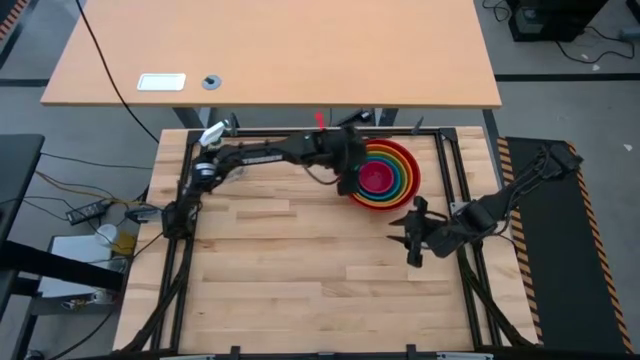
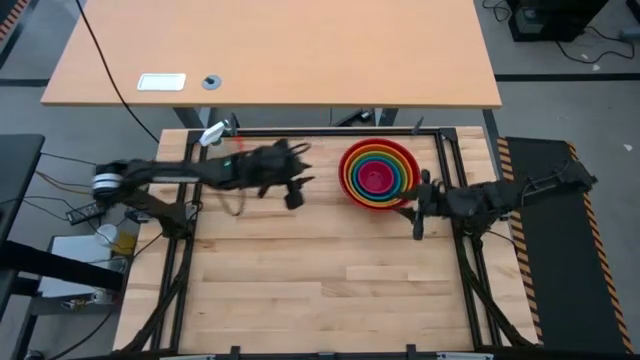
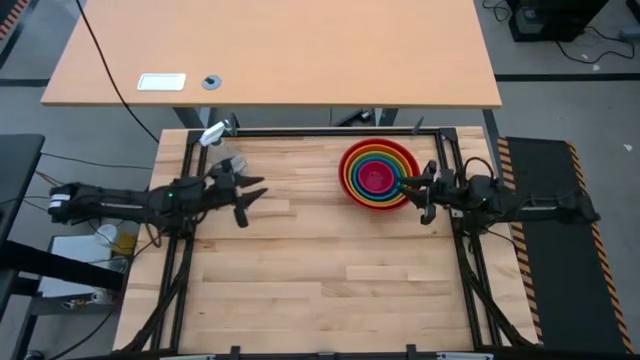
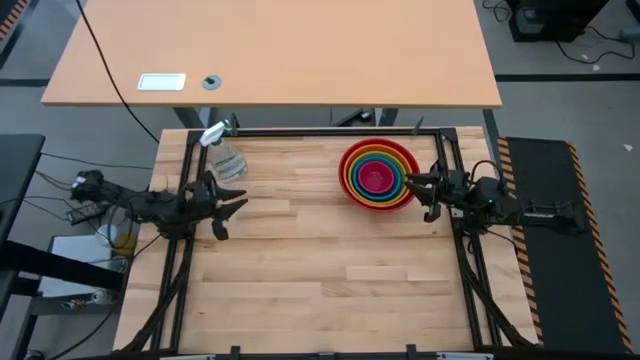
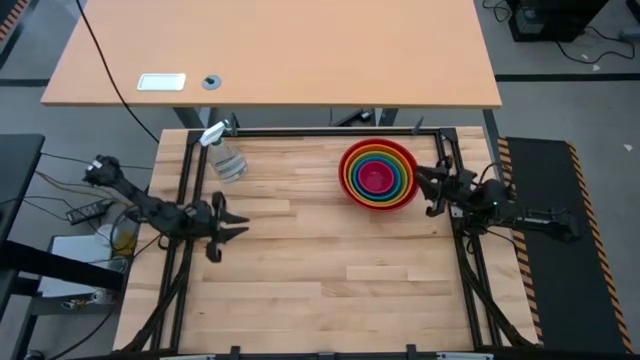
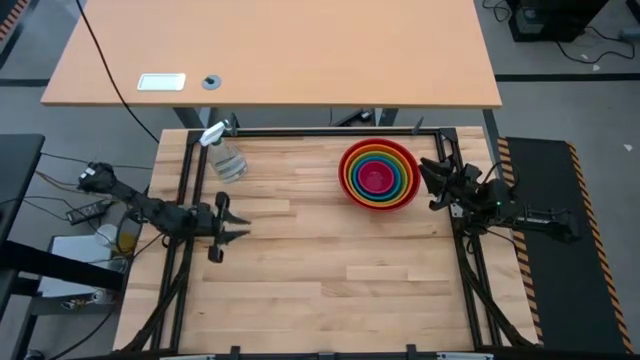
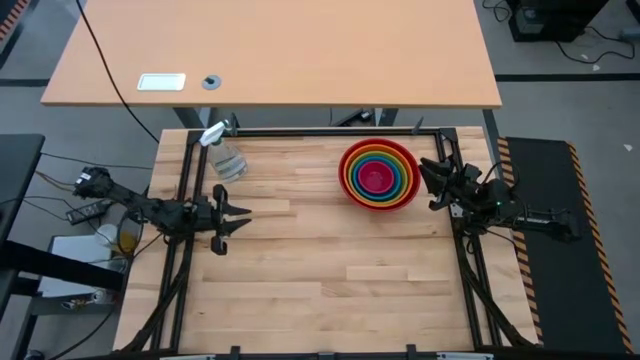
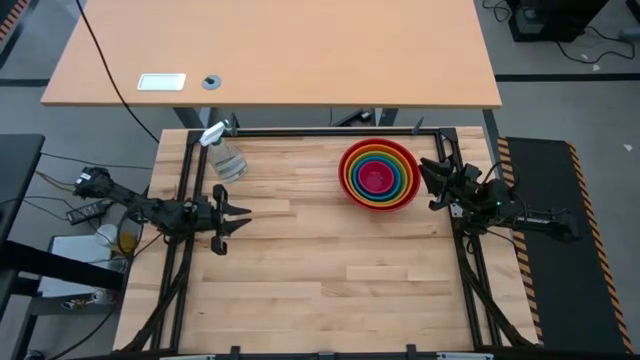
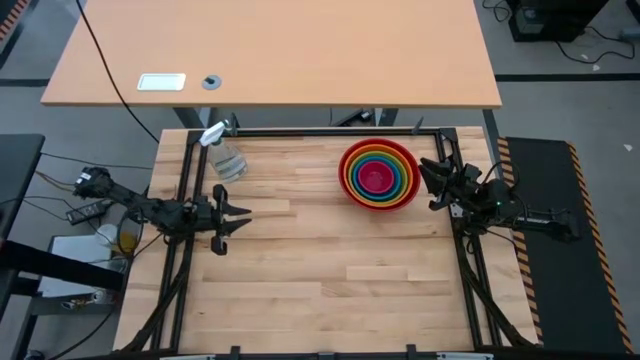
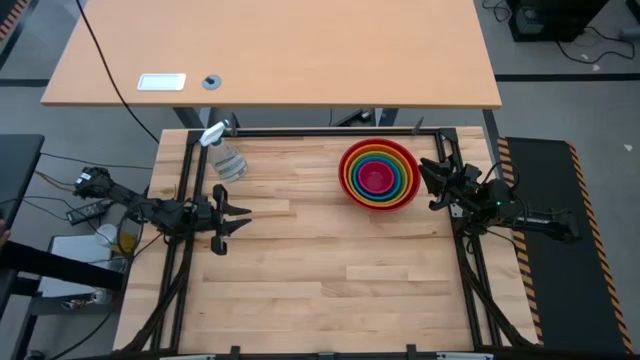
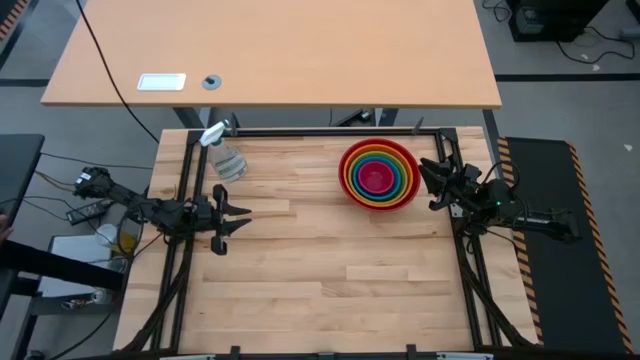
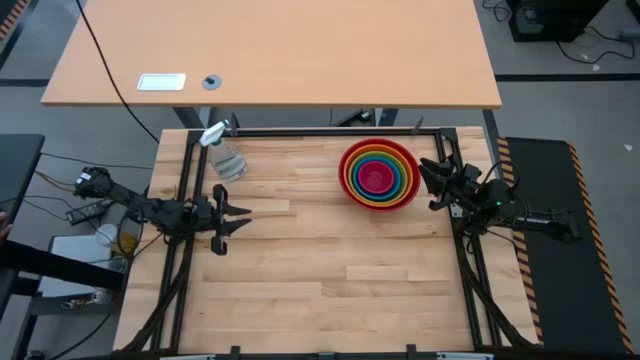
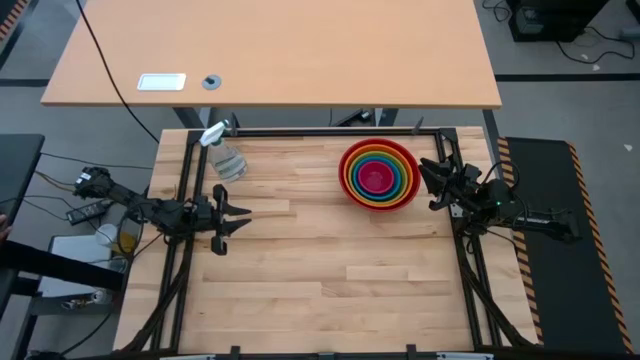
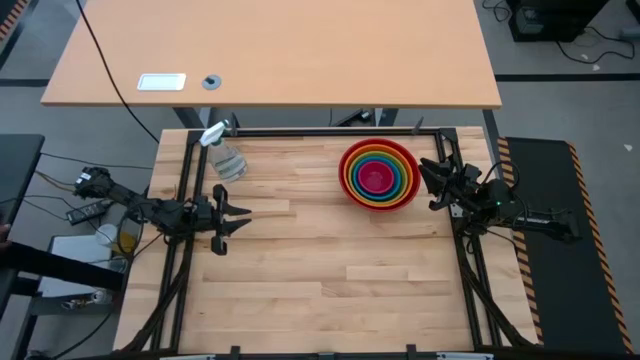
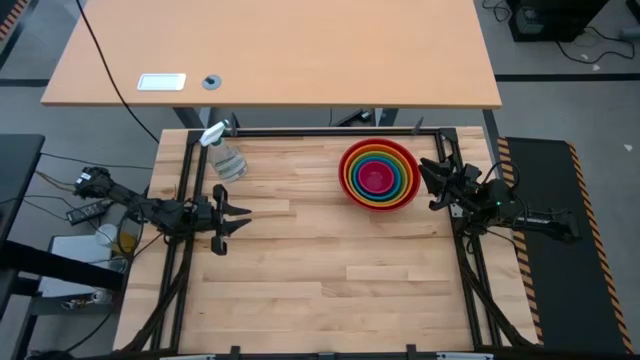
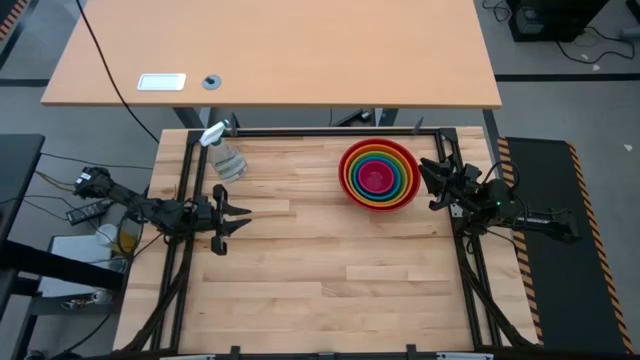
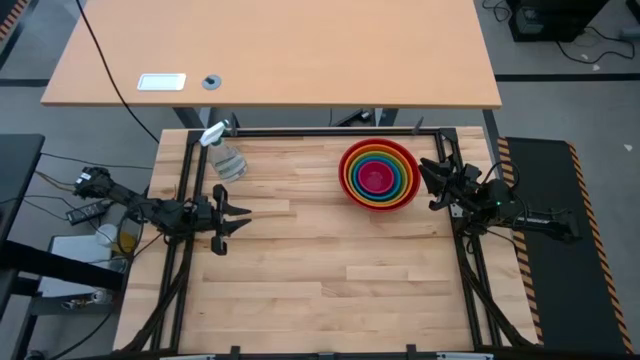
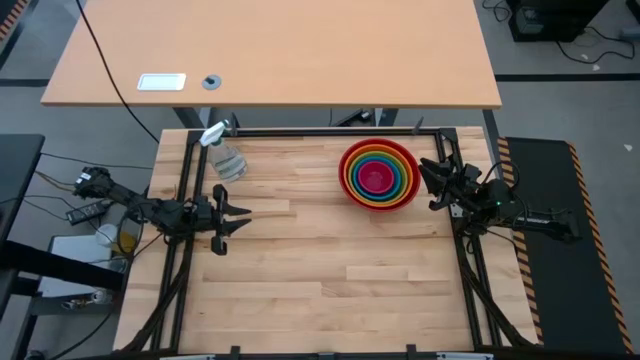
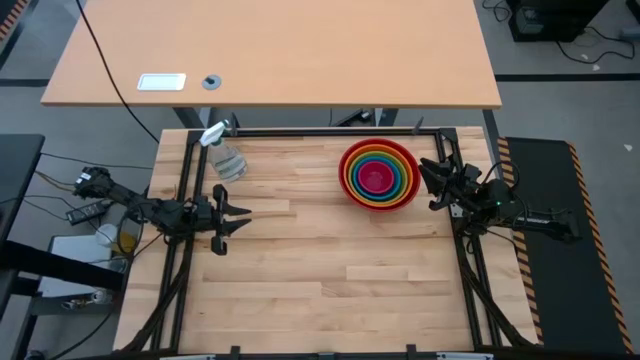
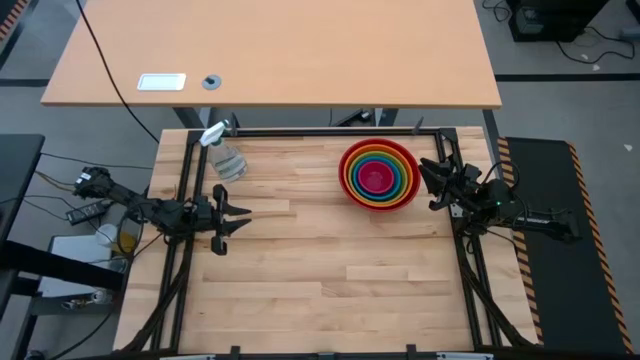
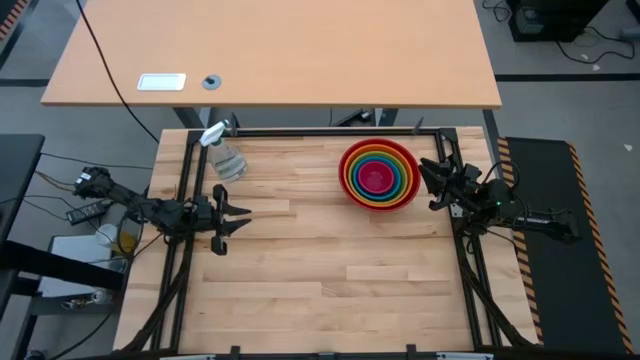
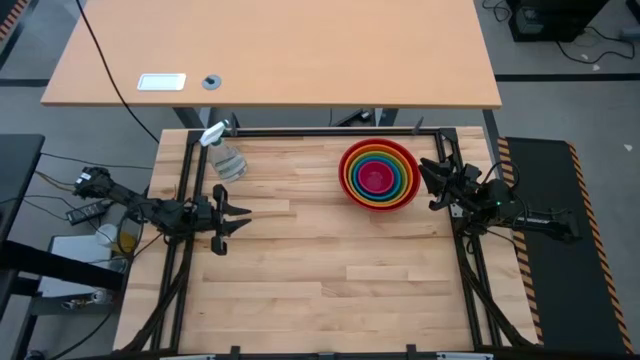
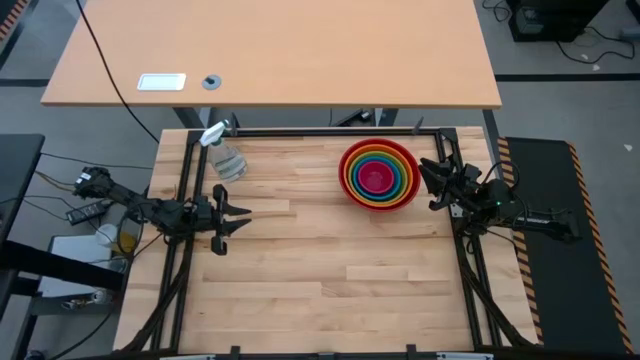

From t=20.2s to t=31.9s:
Return to Home Position
